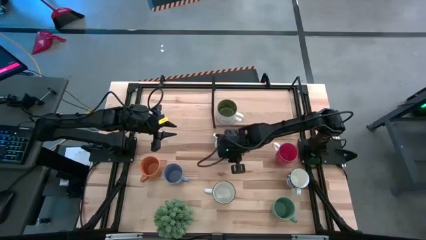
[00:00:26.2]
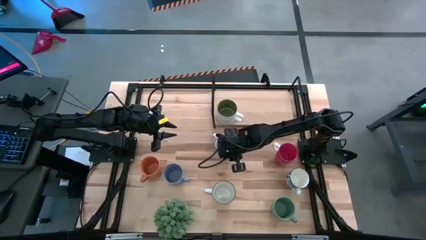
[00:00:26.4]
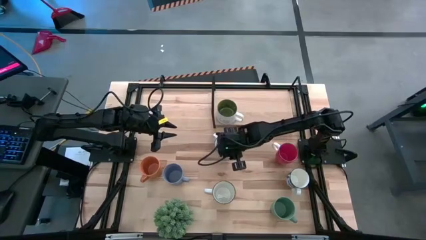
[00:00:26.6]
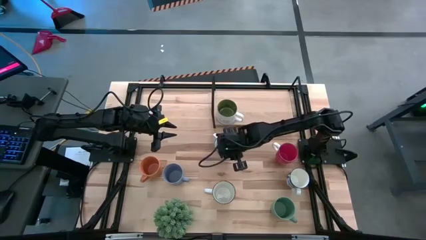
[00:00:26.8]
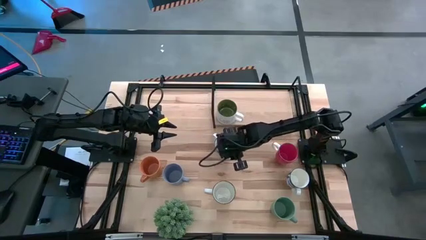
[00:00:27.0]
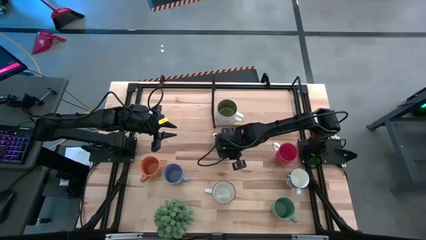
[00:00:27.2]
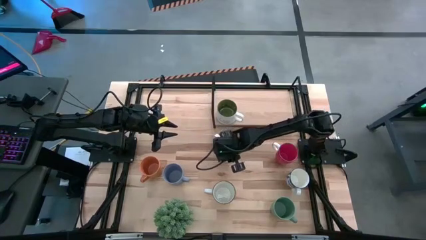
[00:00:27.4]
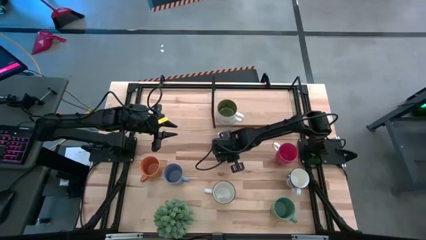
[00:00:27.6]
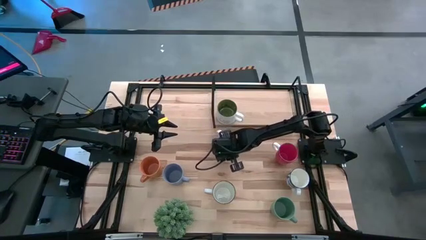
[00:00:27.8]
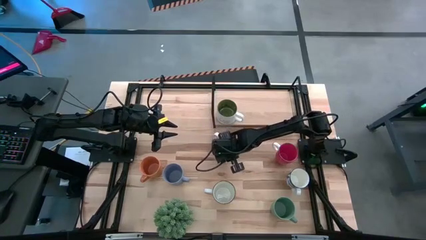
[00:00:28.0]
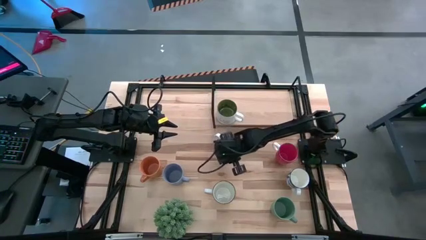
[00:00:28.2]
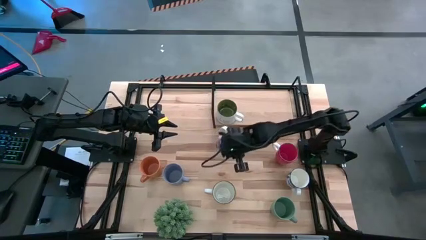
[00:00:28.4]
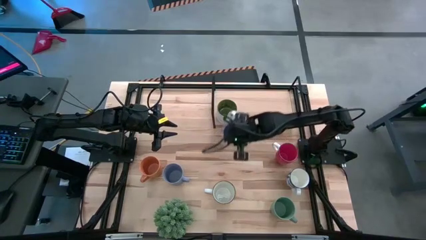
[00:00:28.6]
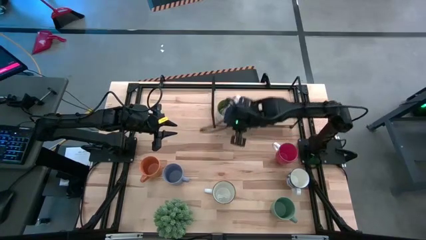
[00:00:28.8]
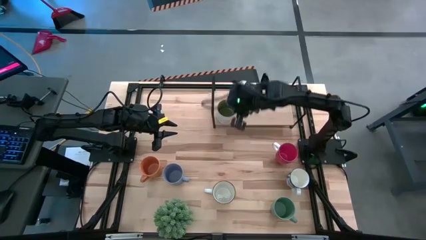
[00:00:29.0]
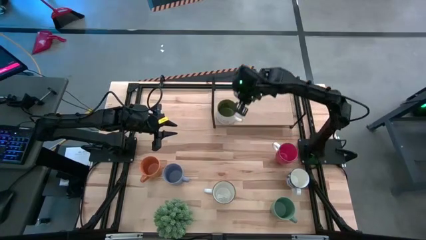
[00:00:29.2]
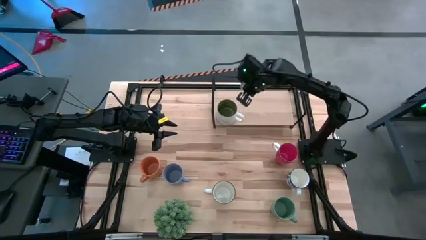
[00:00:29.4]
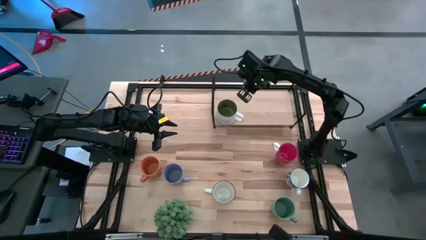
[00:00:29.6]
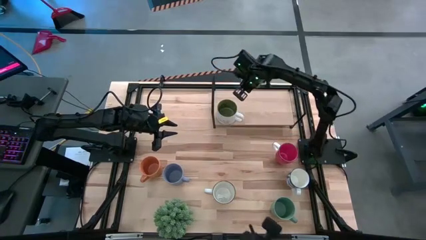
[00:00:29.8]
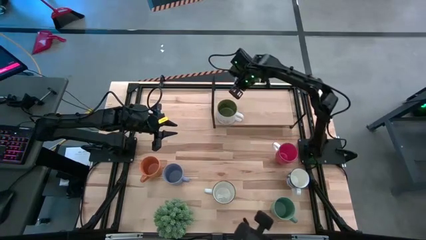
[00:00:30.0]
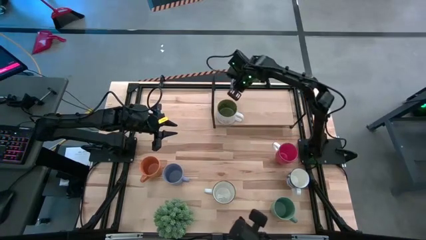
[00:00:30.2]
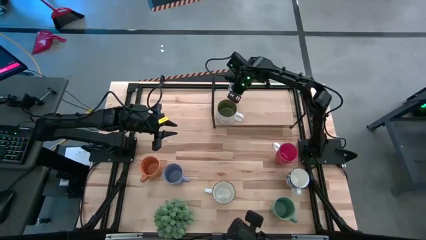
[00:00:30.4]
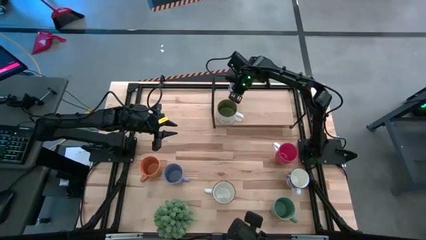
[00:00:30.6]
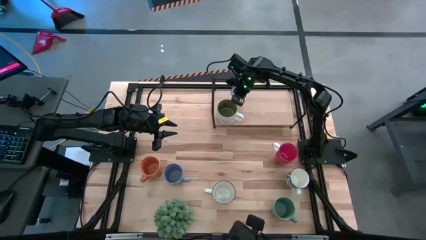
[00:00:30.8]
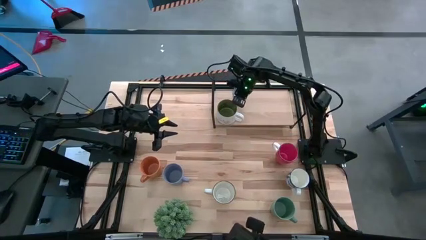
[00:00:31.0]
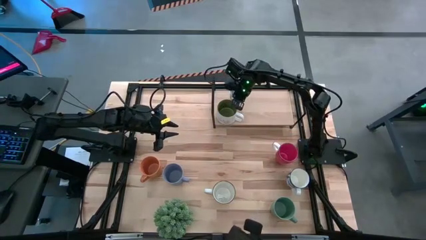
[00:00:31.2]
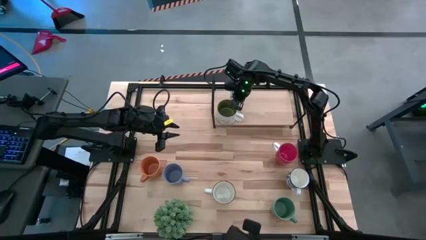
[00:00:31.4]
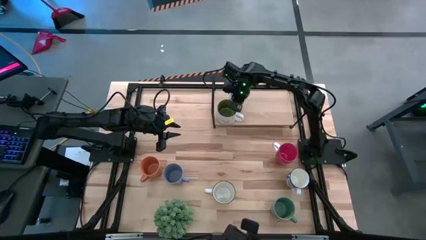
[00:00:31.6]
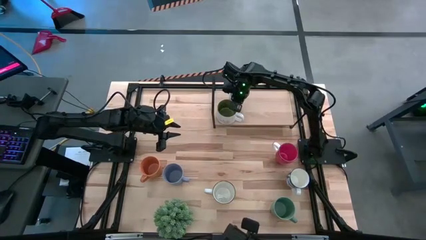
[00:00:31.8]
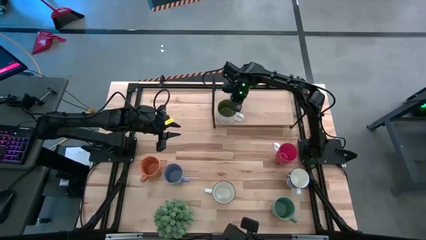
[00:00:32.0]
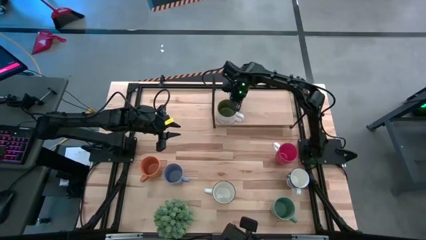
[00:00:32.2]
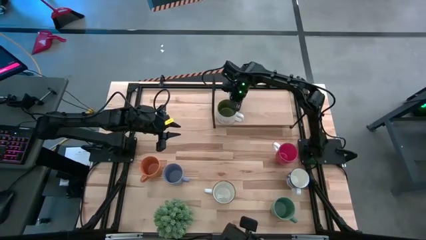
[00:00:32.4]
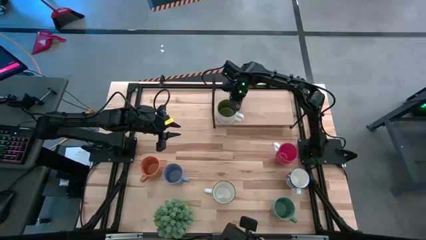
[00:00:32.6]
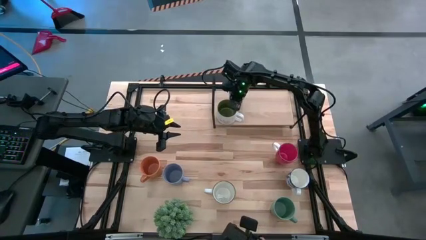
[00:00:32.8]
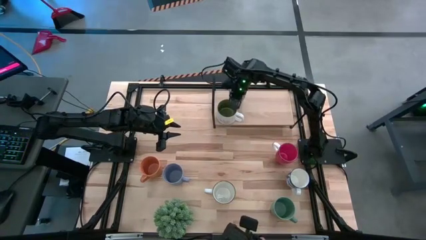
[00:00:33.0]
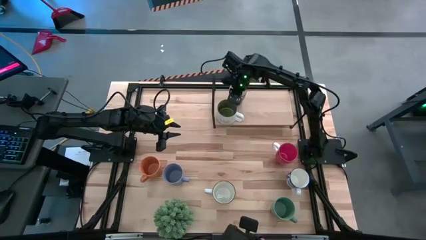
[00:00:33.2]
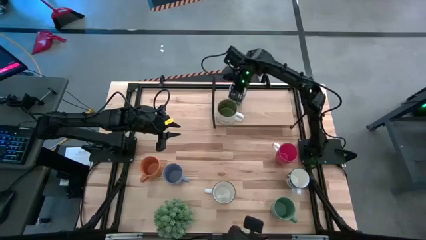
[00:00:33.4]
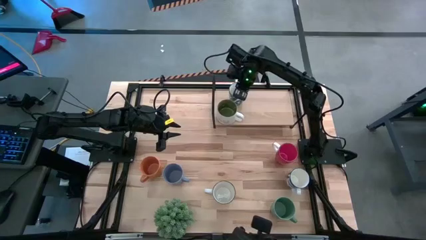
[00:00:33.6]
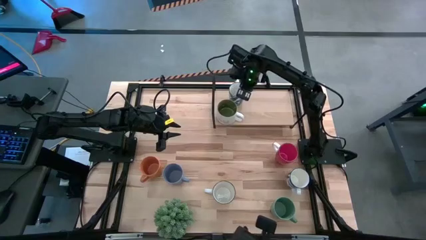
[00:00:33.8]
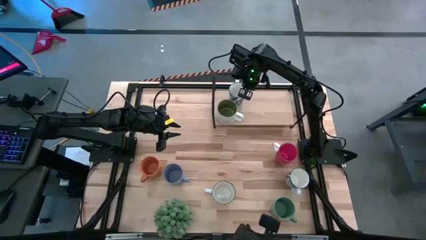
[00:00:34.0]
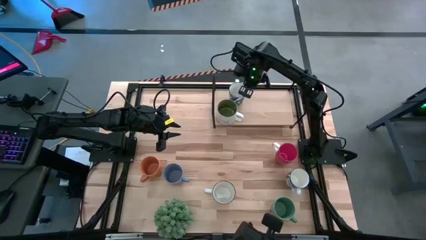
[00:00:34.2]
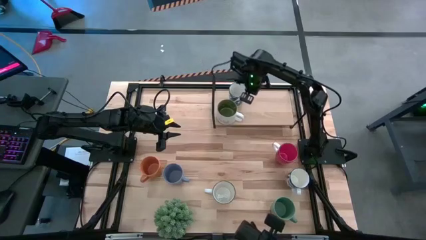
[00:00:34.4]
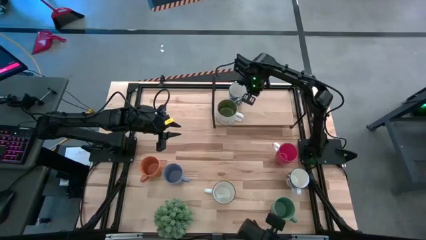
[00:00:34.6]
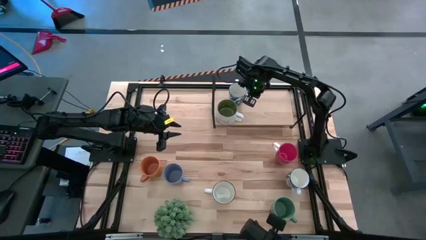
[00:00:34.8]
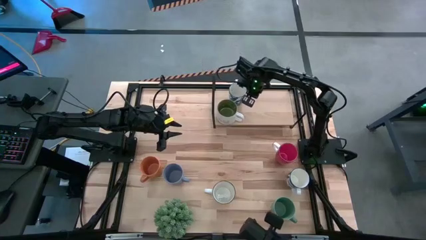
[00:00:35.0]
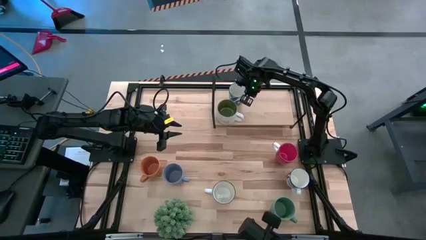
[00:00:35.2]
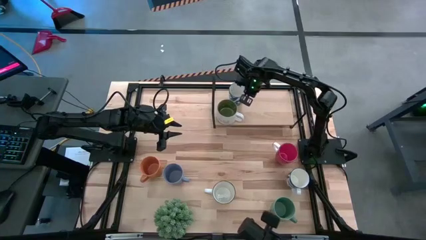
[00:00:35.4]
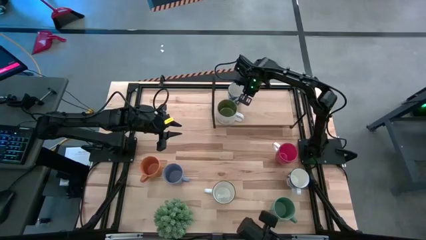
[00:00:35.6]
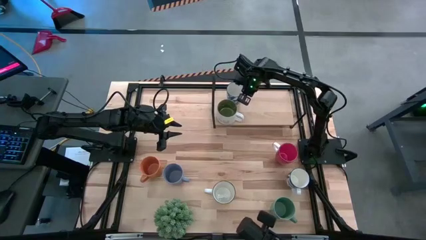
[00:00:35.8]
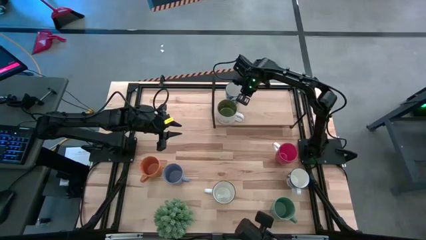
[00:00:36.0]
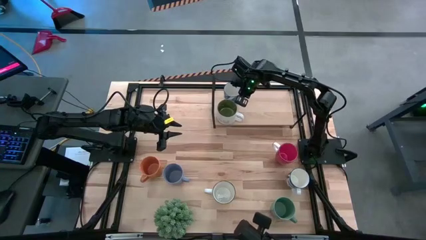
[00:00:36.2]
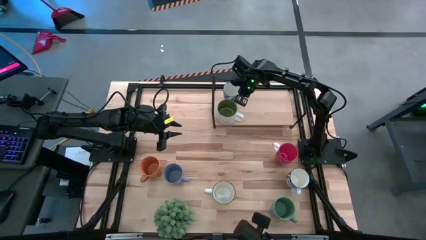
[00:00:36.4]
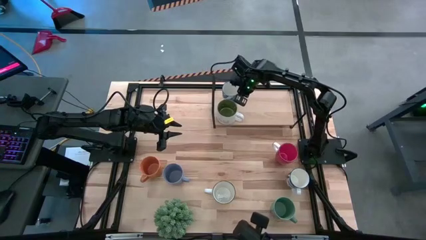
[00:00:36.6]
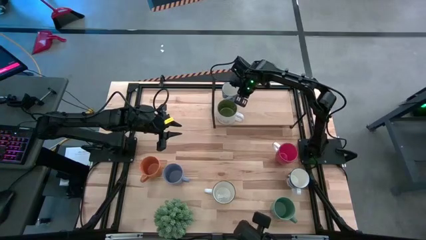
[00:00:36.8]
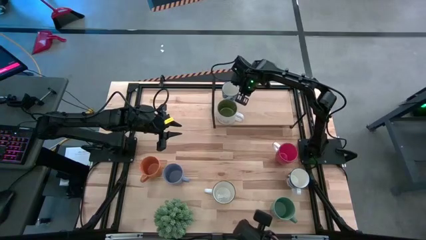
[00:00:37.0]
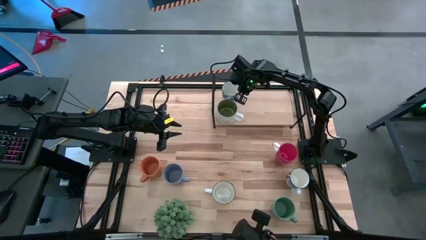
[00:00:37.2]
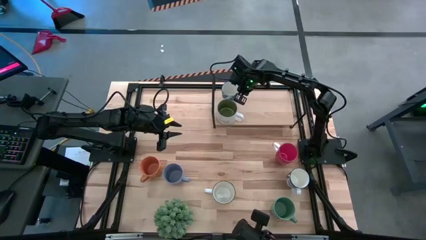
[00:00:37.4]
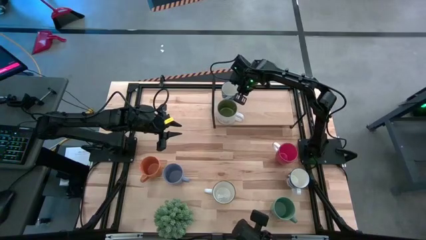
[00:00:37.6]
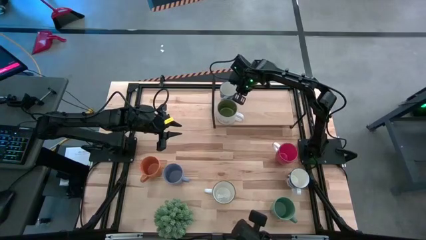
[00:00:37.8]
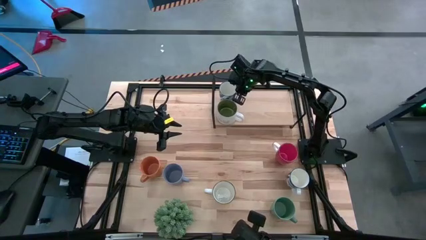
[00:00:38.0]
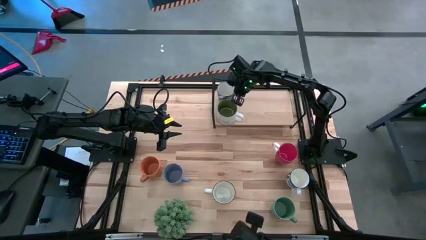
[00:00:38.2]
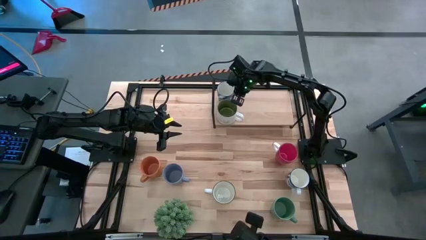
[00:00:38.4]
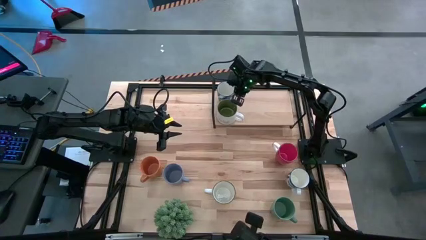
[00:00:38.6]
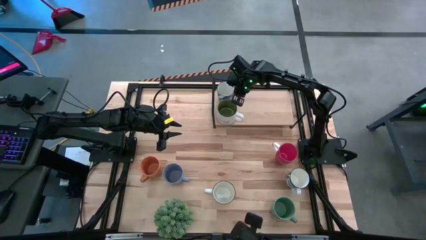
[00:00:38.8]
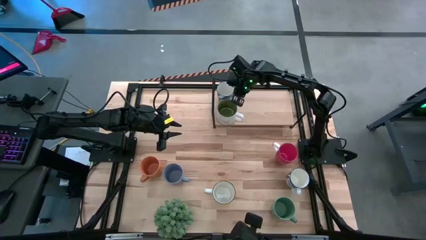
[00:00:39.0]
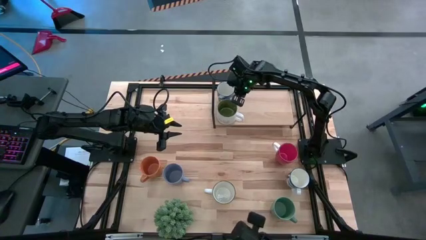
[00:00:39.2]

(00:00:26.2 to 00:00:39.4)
Task: Place coffee mugs
Put the left blue patterned mug on the shelf

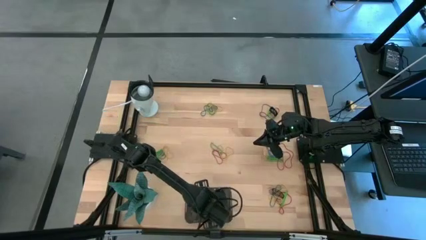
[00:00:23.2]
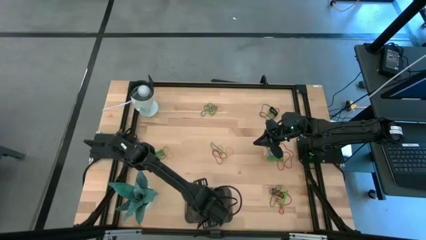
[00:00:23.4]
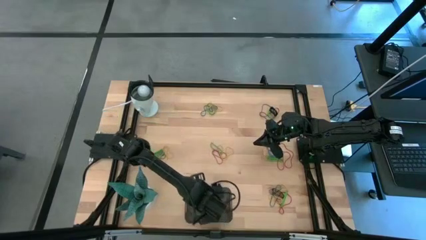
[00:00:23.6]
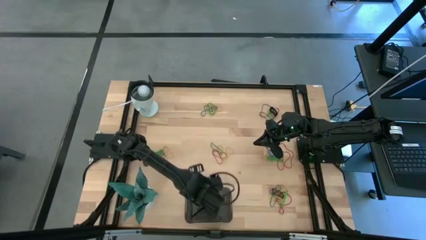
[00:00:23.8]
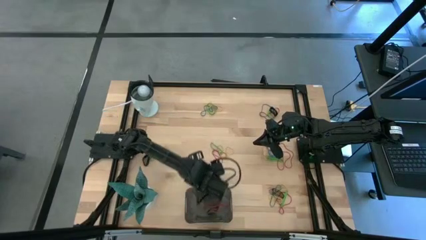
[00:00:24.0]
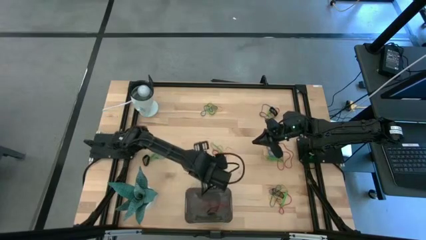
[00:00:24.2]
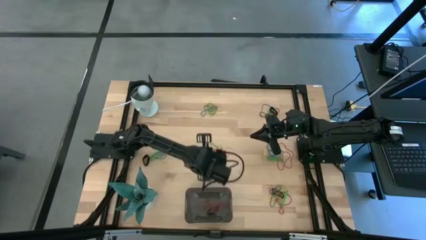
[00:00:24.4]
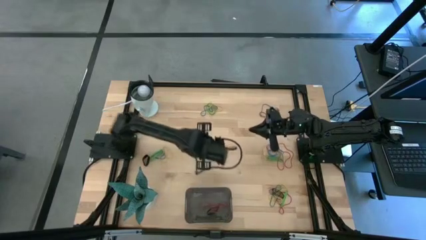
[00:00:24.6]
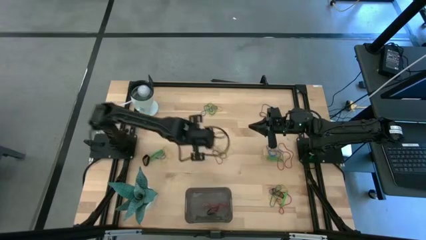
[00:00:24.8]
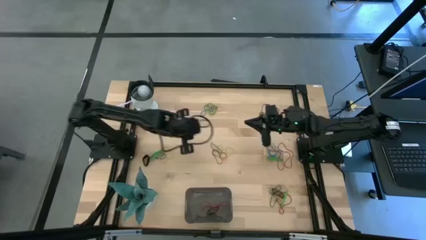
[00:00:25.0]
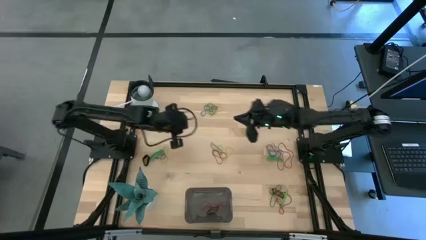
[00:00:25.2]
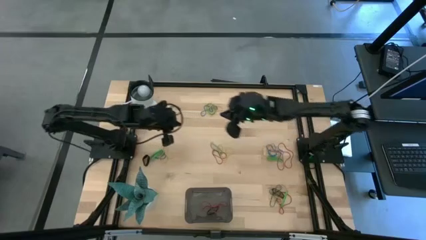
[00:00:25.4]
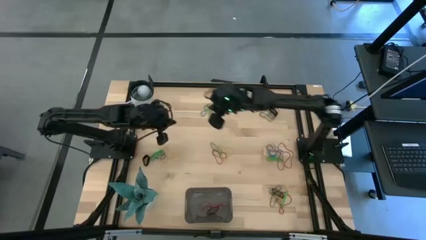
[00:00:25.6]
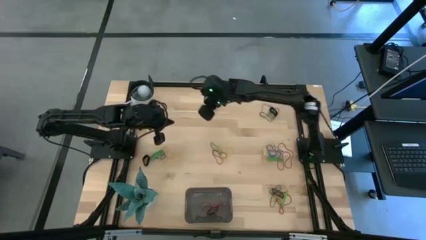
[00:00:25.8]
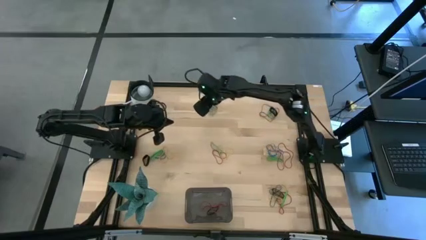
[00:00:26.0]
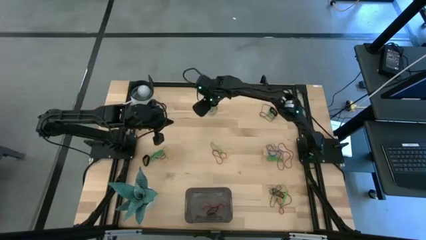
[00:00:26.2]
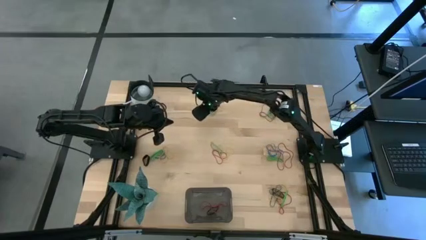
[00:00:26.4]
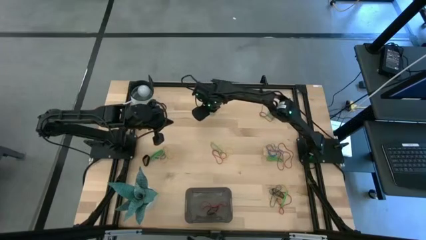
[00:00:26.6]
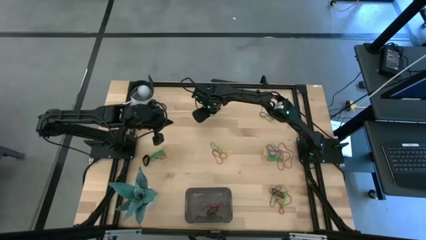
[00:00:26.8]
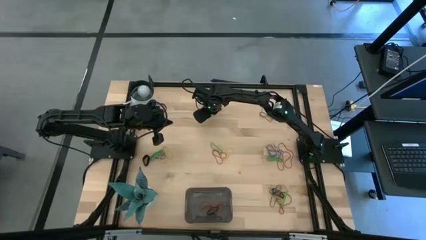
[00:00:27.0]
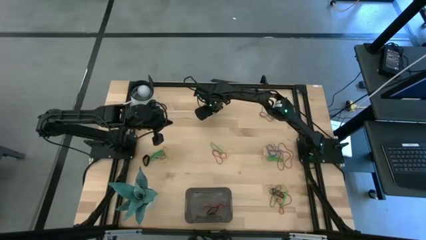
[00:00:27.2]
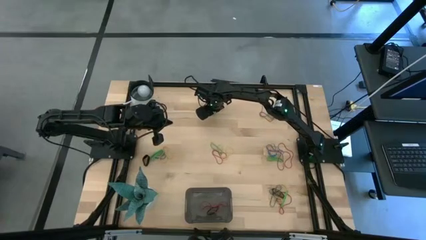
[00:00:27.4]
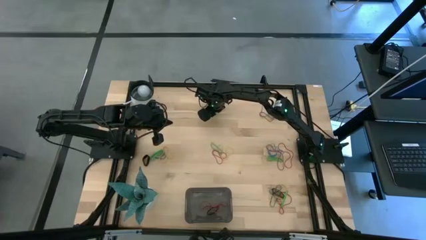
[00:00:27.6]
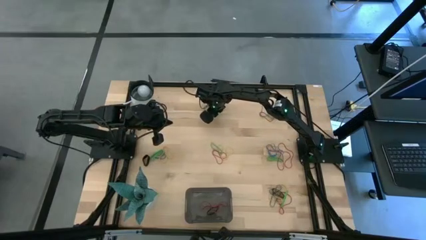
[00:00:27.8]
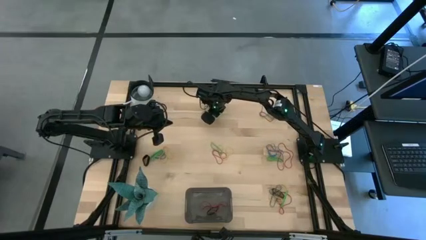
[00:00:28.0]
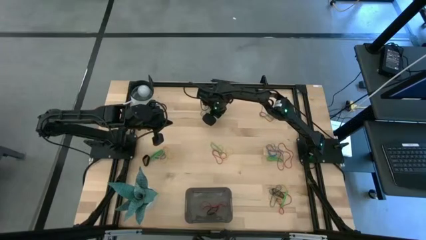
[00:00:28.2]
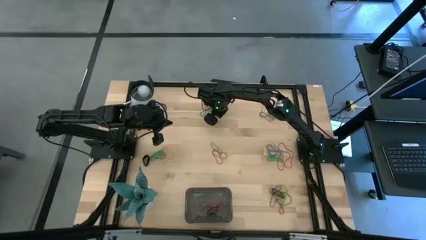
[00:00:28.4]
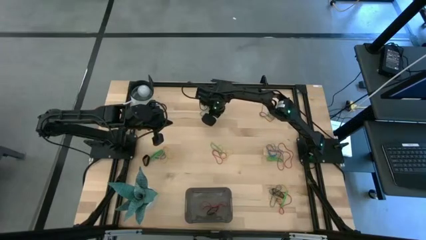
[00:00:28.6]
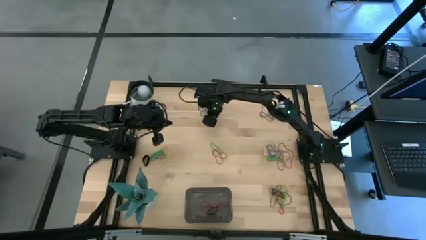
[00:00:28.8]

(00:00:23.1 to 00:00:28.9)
Task: Pick and place rubber bands into bin
Put the green rubber band into the black bin
